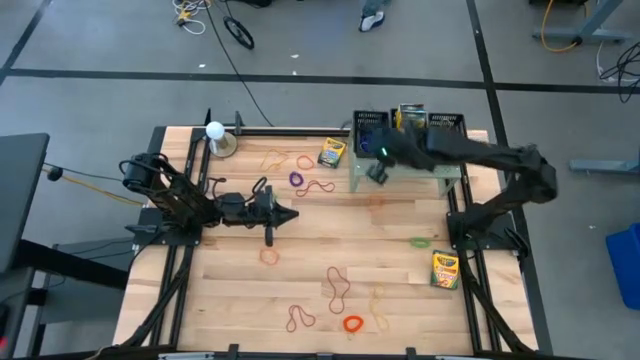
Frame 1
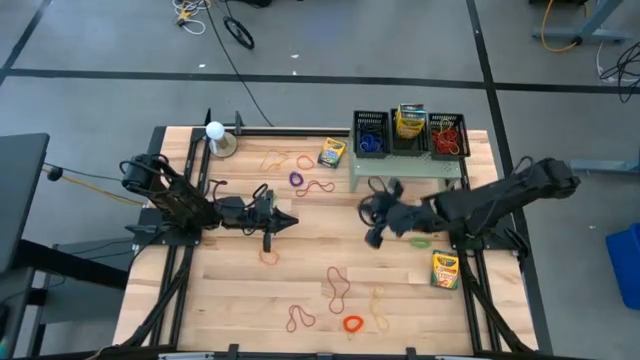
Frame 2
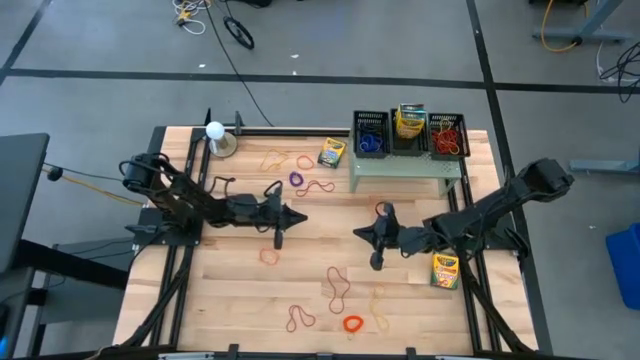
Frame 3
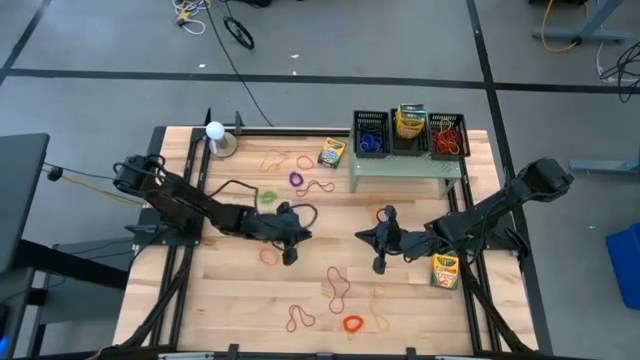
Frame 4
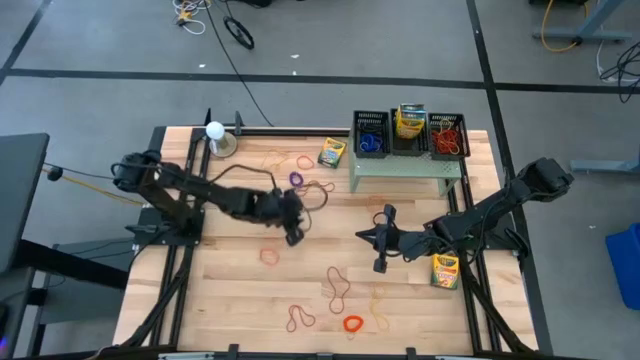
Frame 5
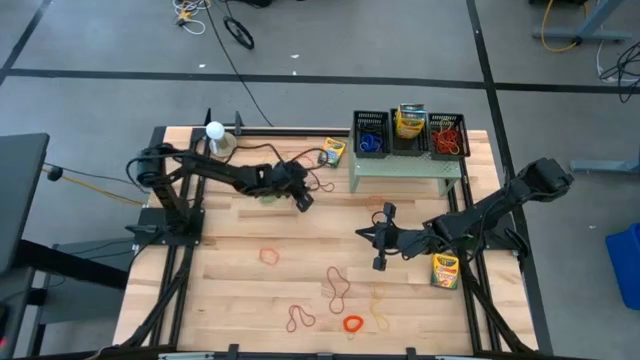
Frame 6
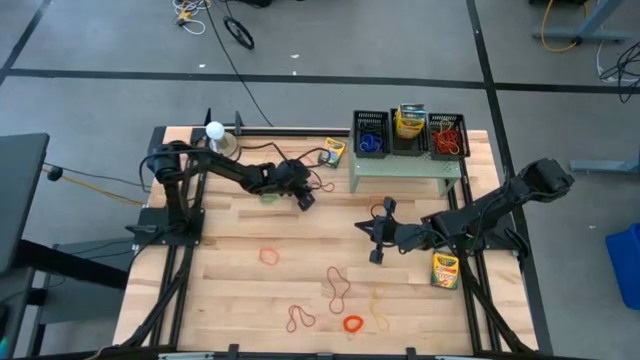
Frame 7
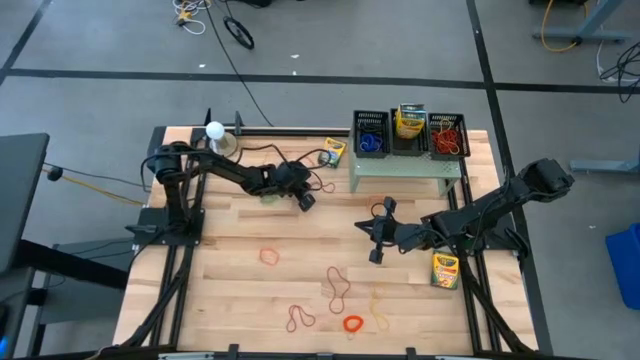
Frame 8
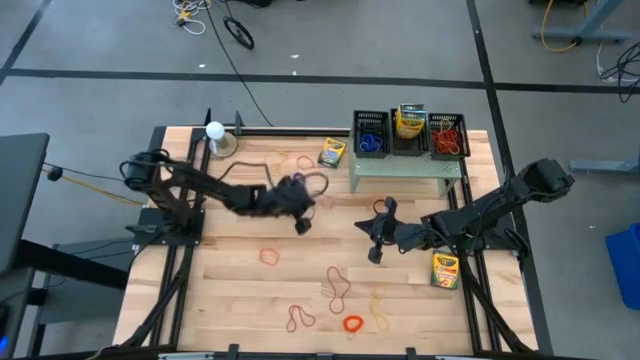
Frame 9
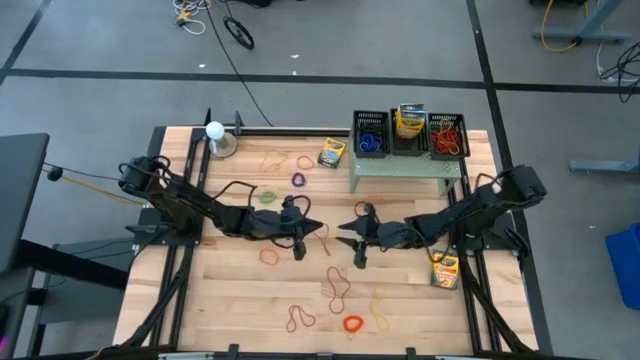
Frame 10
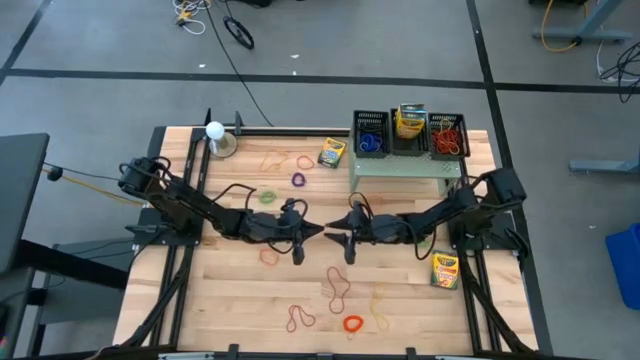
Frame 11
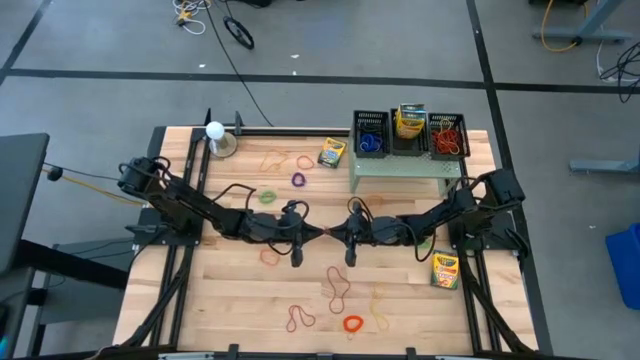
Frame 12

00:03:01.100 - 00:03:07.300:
Task: Pick & Place Office Desk Supplies
Put the top red rubber band into the right black basket on the shelf

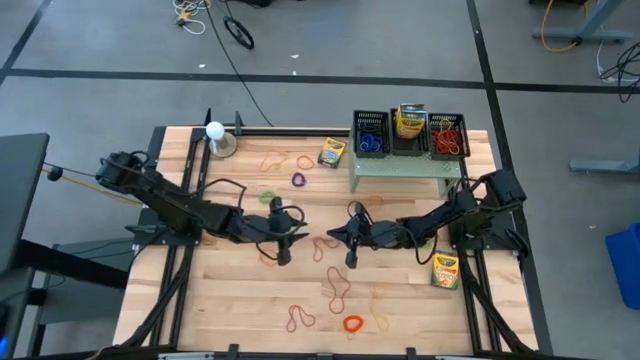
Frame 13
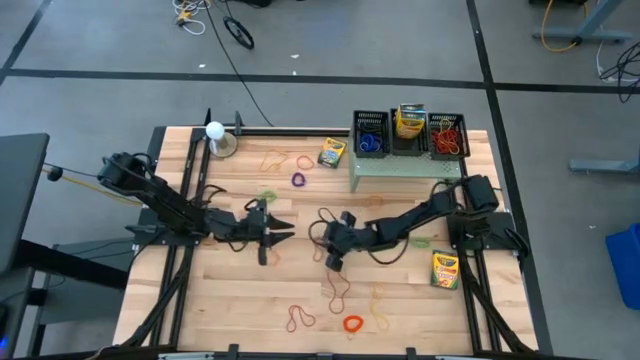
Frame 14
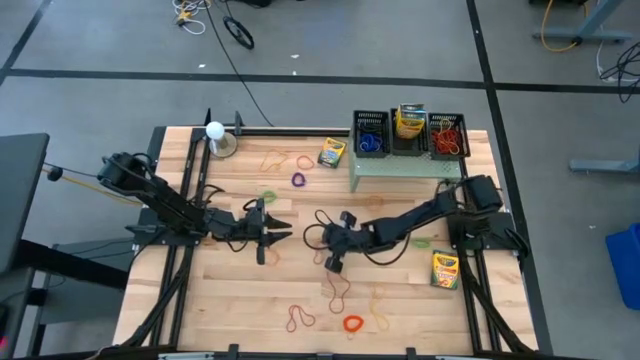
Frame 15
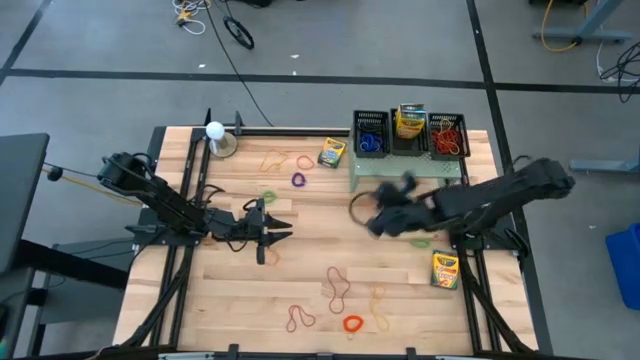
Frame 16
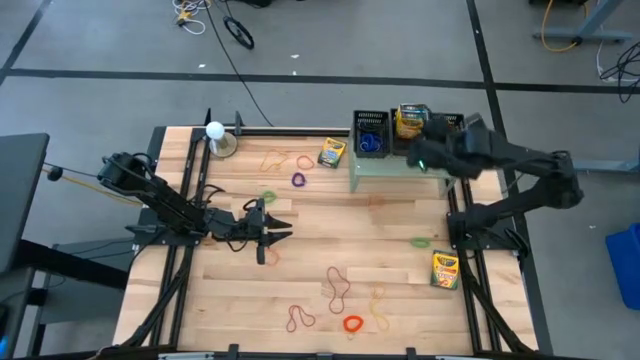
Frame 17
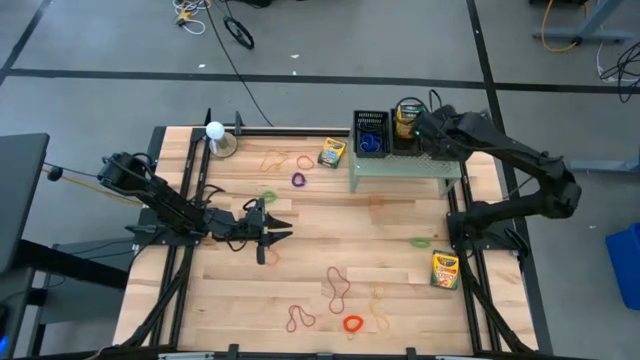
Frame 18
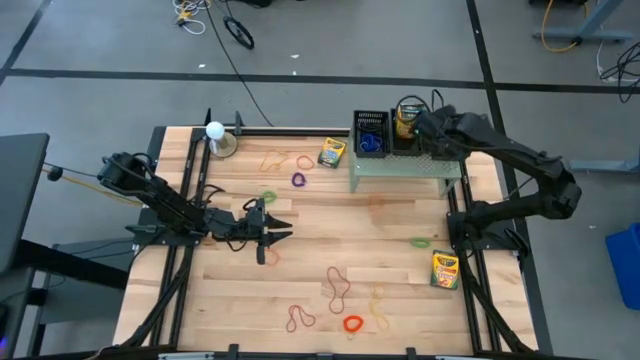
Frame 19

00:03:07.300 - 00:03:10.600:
Put the top red rubber band into the right black basket on the shelf

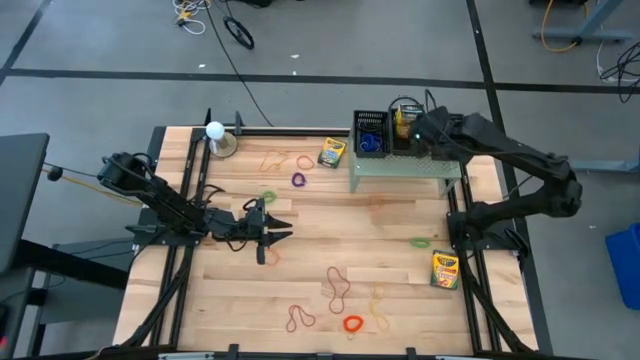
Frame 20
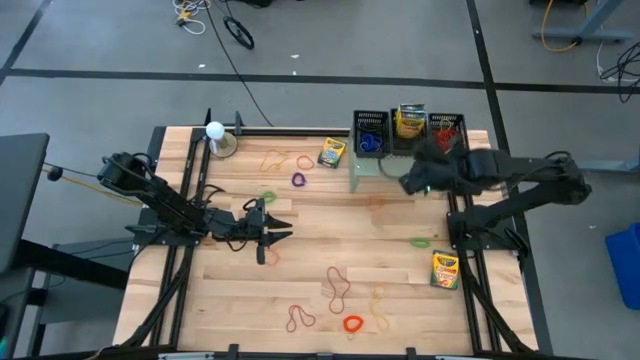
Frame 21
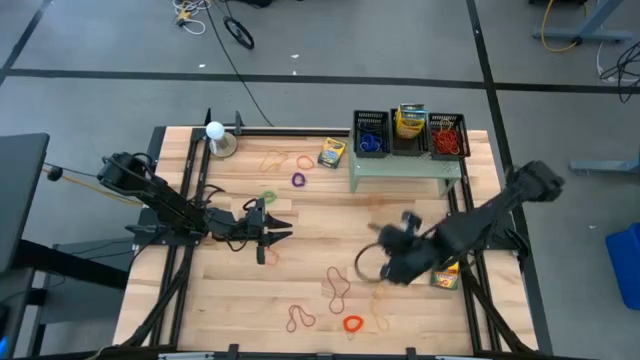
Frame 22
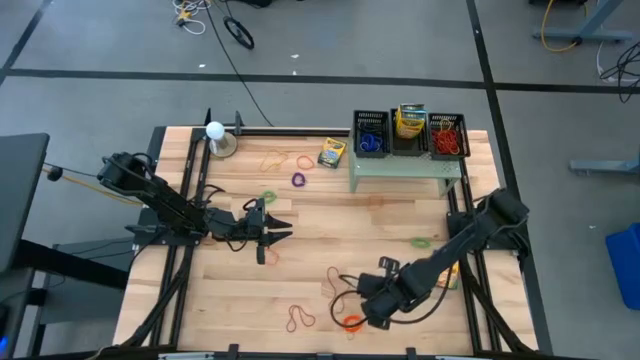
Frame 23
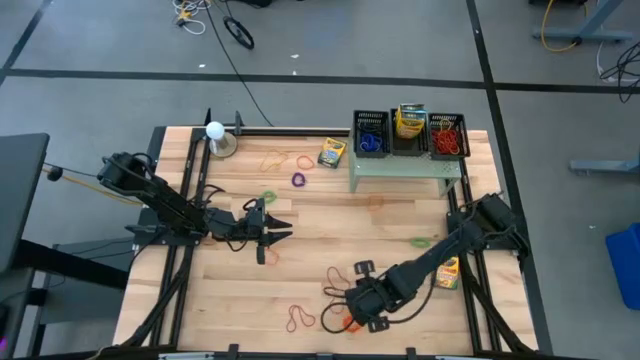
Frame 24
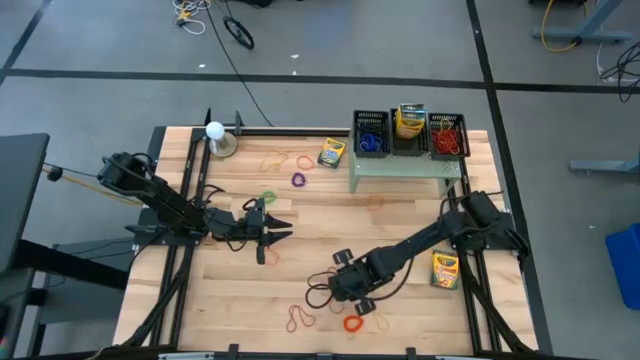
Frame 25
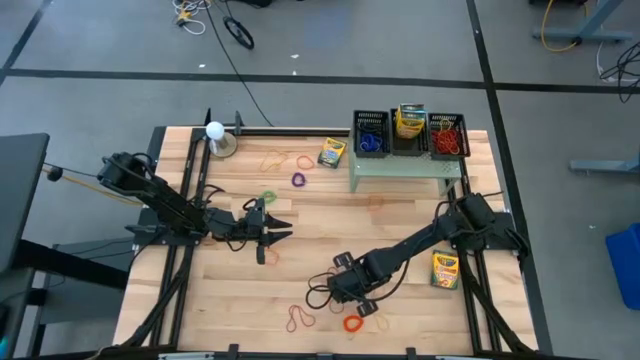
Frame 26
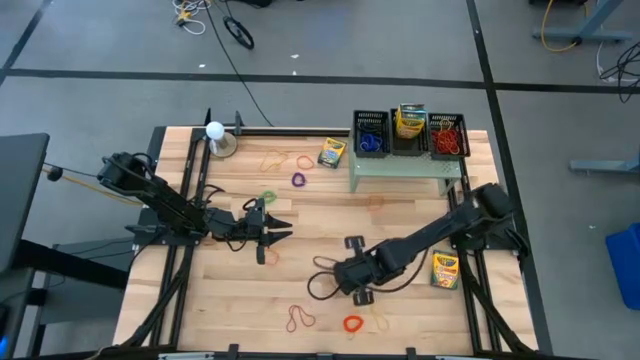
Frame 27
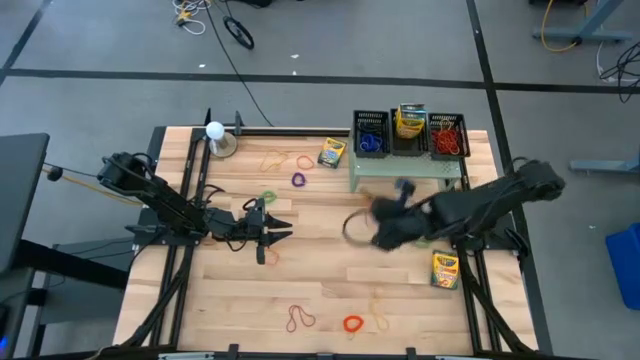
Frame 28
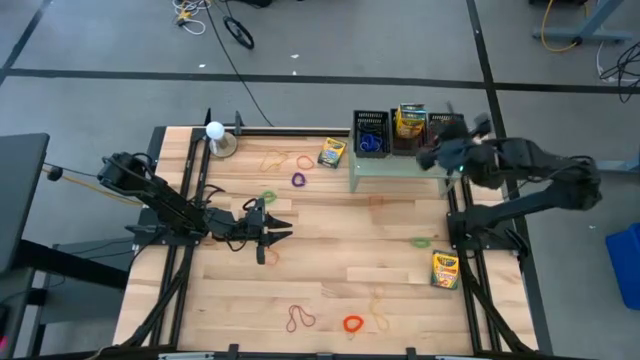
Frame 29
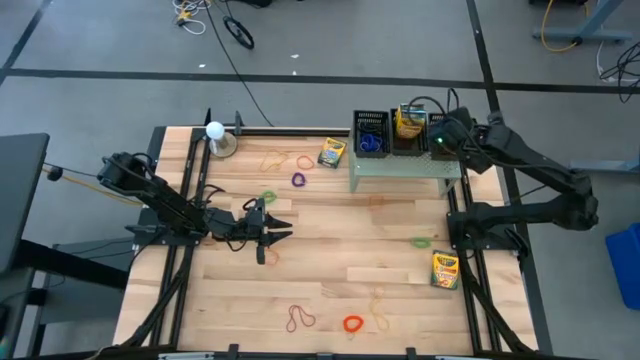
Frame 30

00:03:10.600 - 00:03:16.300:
Put the right red rubber band into the right black basket on the shelf

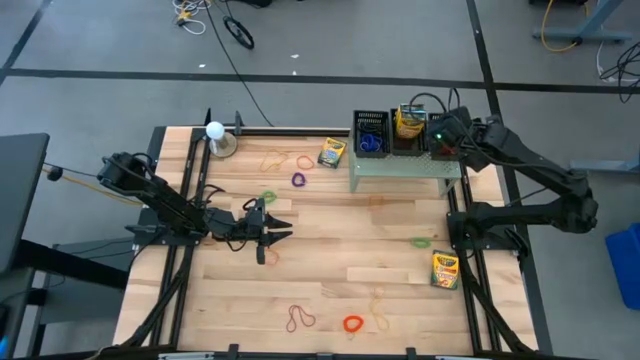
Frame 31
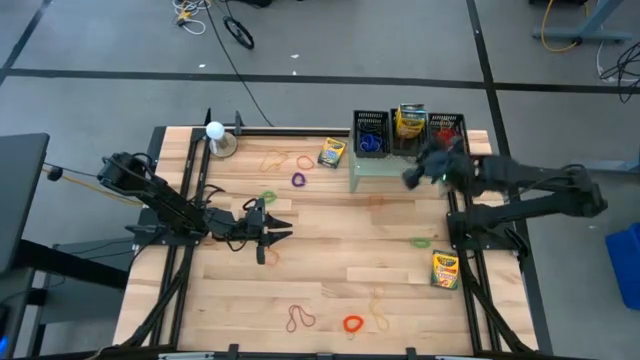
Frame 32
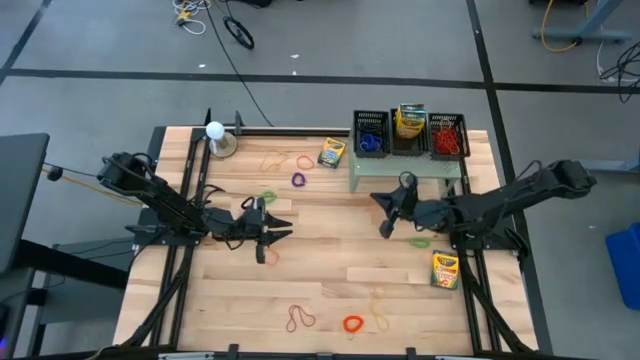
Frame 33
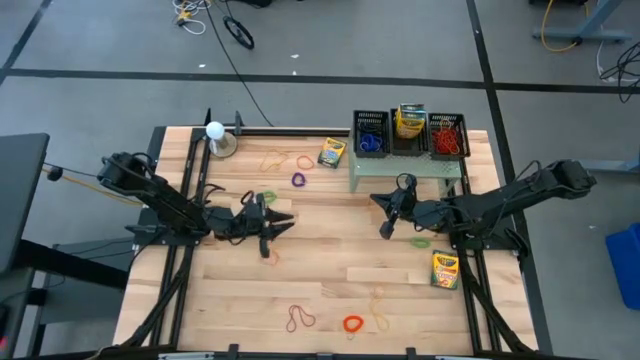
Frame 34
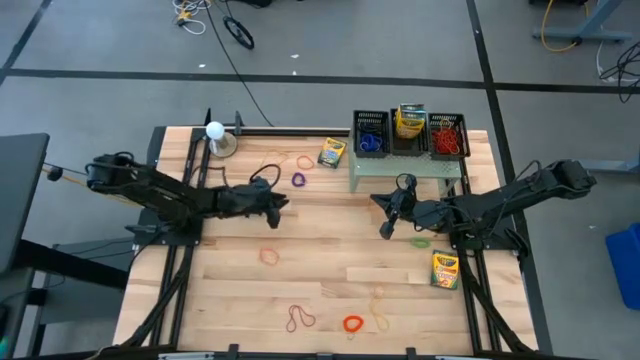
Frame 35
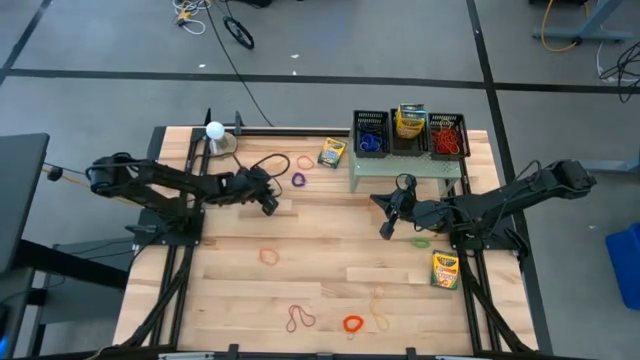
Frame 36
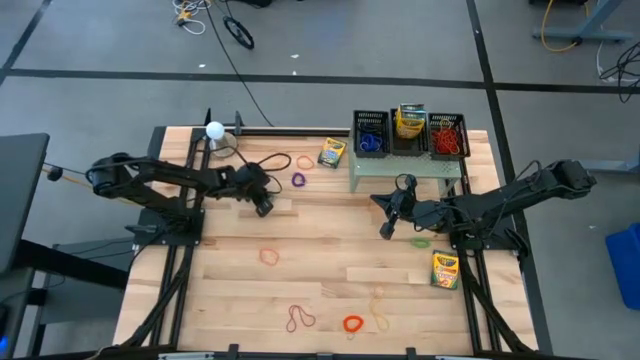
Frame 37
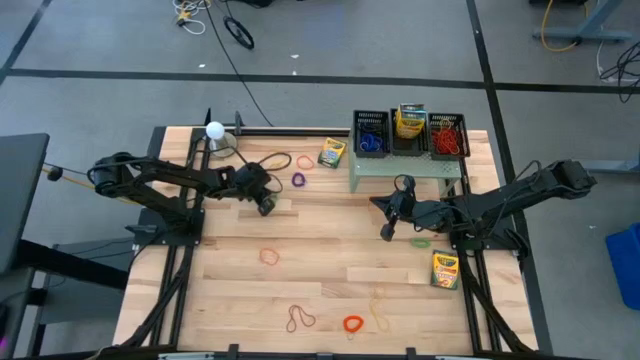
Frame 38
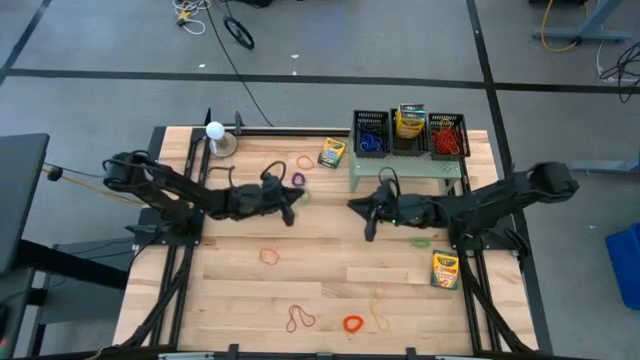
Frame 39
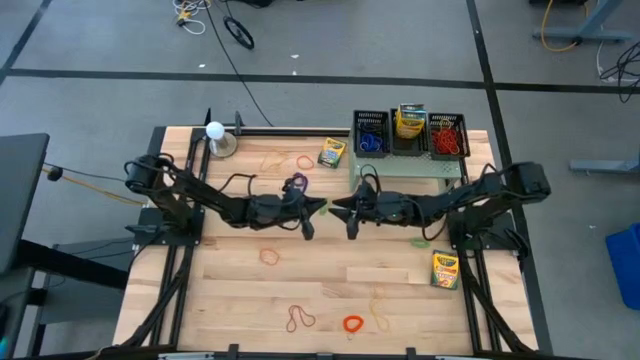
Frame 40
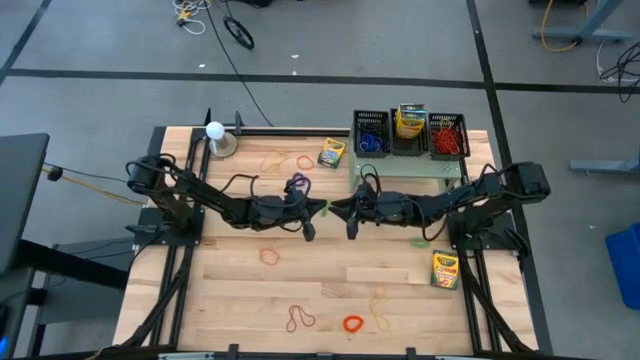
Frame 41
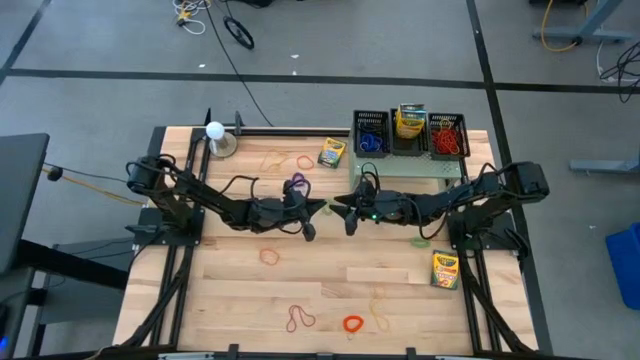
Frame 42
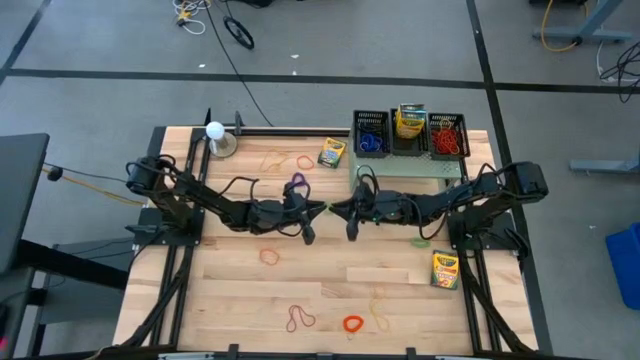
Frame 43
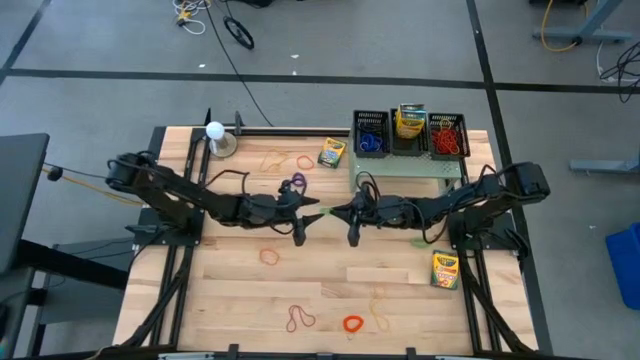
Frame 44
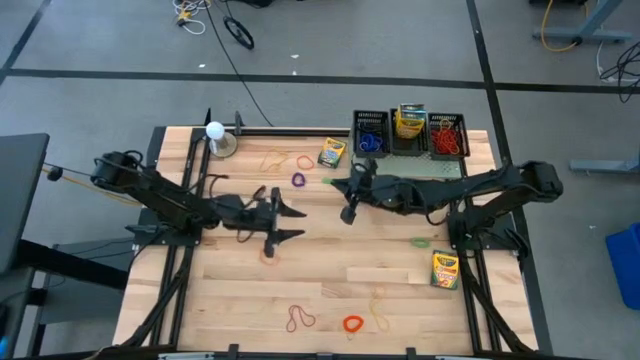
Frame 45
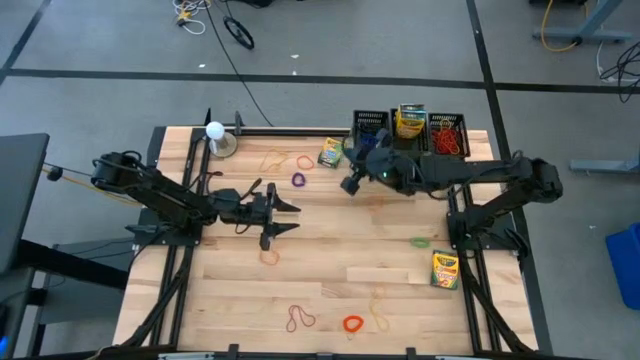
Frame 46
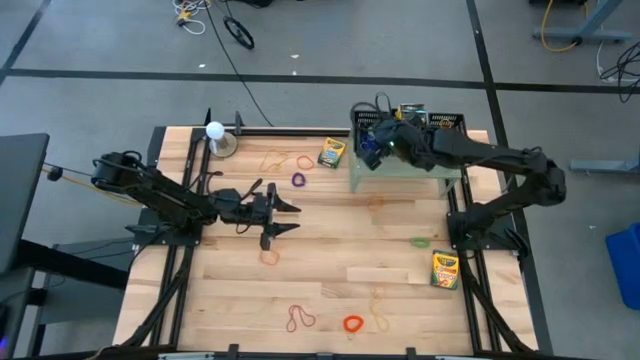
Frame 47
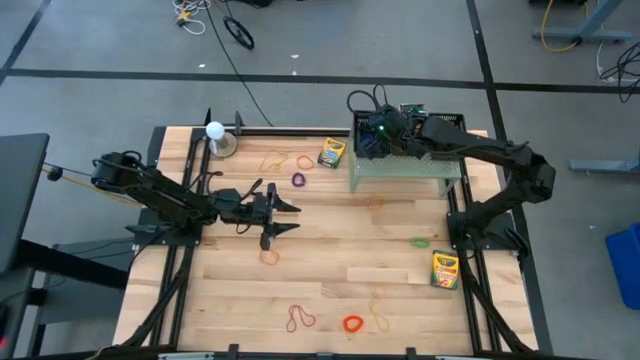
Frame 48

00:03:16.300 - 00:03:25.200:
Put the left green spring keychain into the left black basket on the shelf
